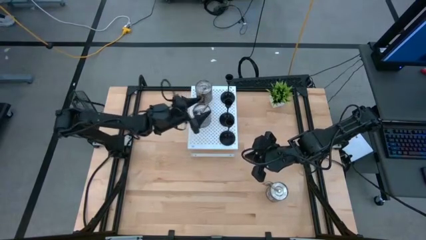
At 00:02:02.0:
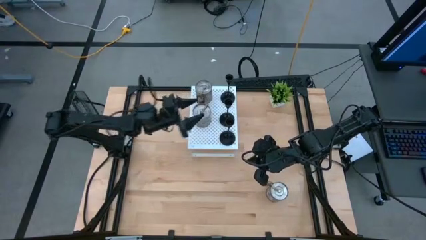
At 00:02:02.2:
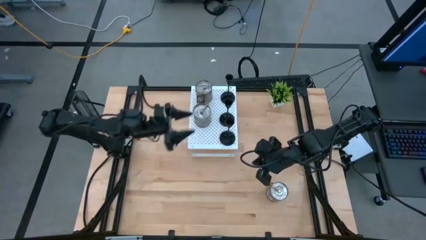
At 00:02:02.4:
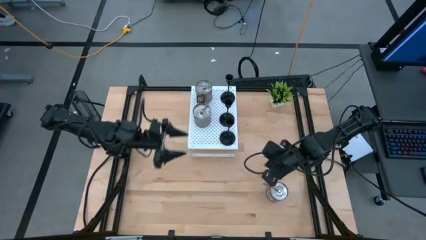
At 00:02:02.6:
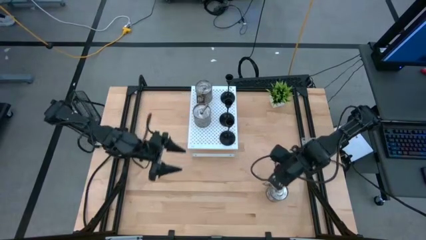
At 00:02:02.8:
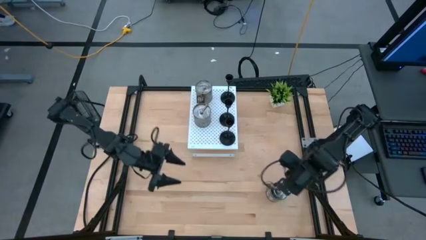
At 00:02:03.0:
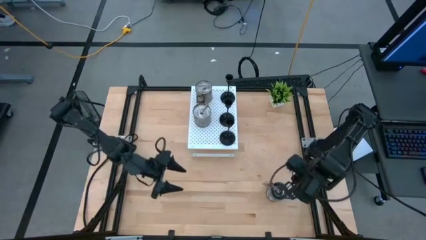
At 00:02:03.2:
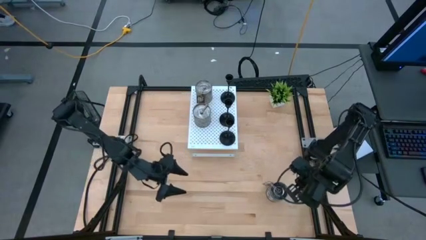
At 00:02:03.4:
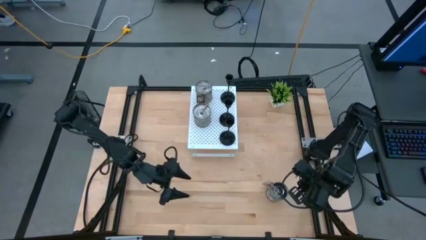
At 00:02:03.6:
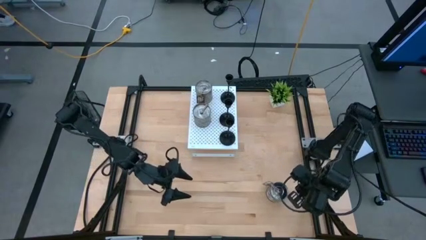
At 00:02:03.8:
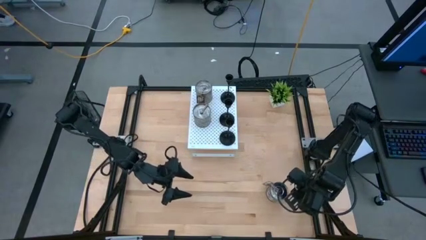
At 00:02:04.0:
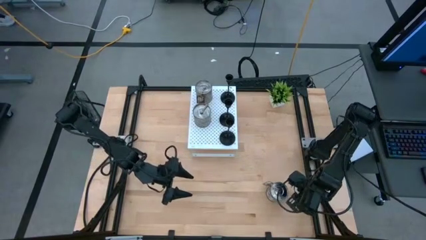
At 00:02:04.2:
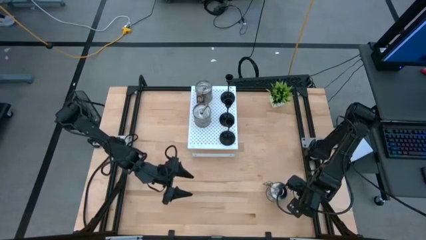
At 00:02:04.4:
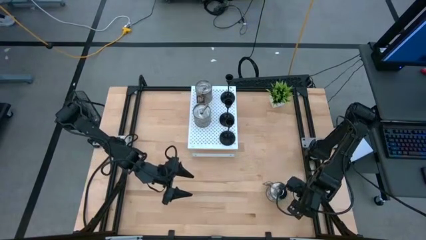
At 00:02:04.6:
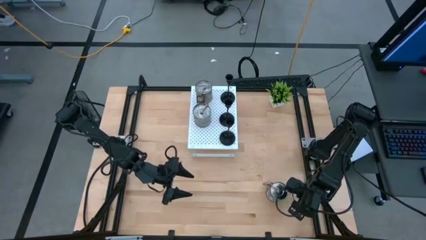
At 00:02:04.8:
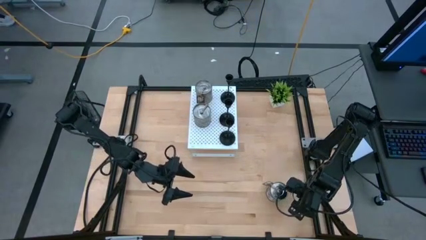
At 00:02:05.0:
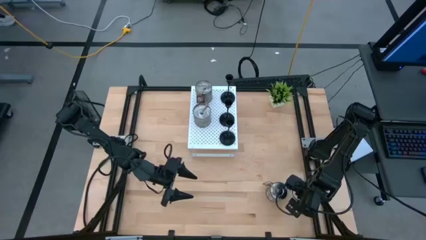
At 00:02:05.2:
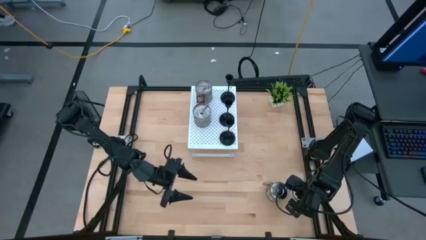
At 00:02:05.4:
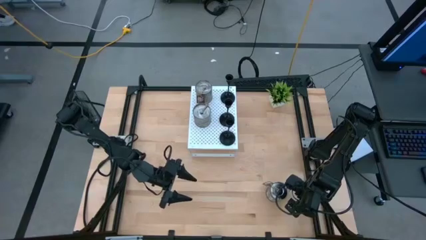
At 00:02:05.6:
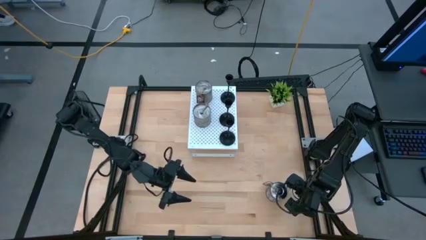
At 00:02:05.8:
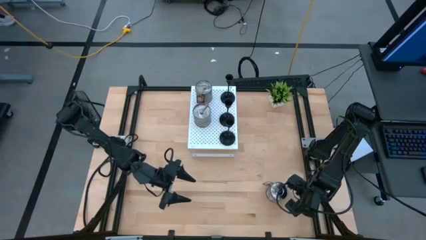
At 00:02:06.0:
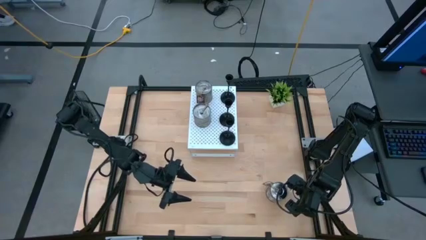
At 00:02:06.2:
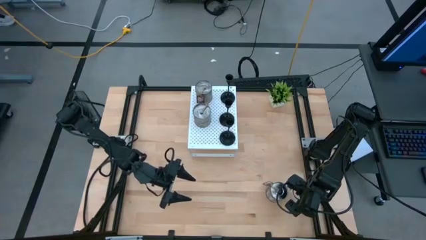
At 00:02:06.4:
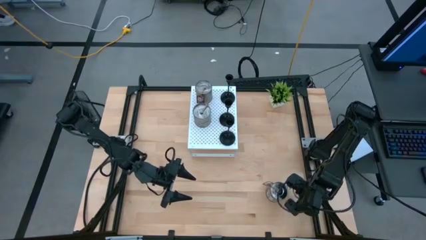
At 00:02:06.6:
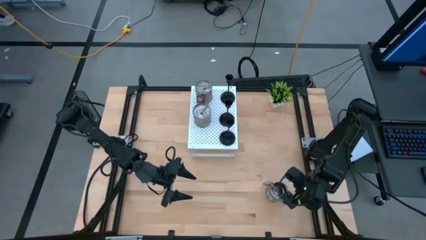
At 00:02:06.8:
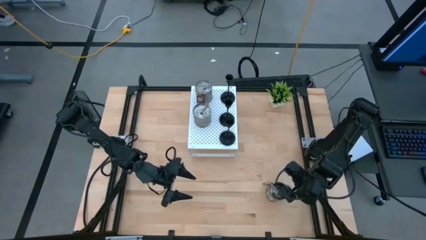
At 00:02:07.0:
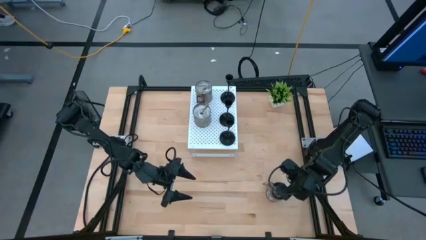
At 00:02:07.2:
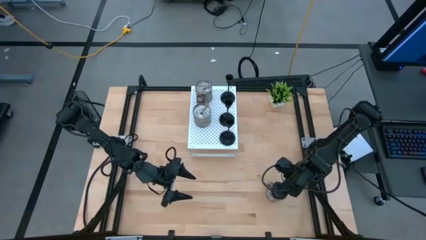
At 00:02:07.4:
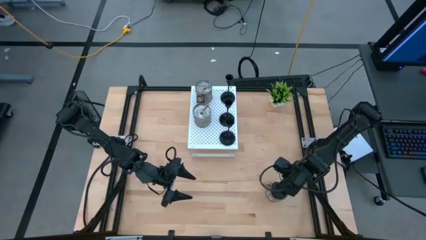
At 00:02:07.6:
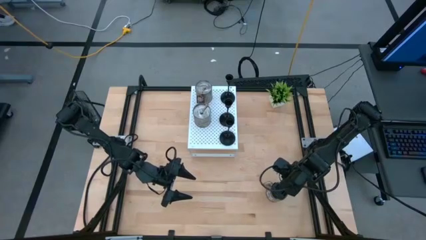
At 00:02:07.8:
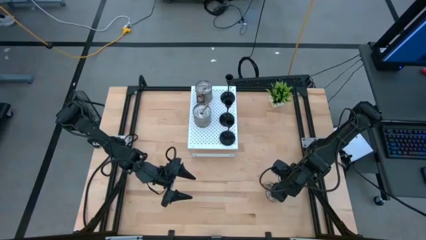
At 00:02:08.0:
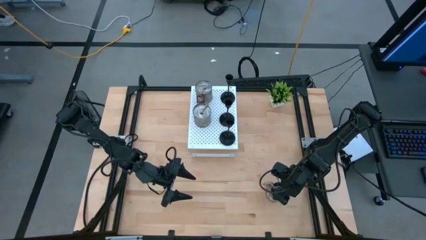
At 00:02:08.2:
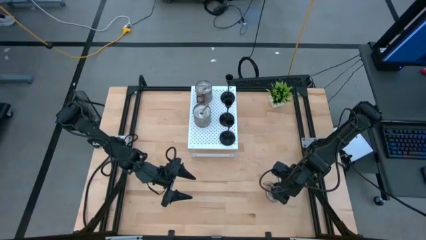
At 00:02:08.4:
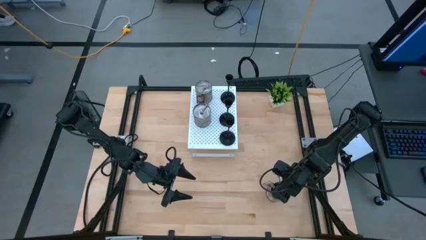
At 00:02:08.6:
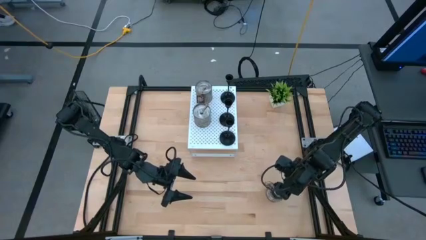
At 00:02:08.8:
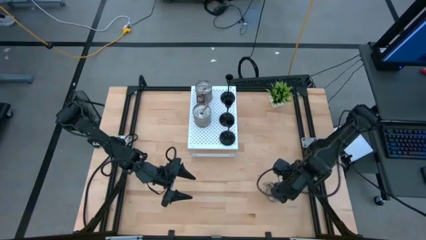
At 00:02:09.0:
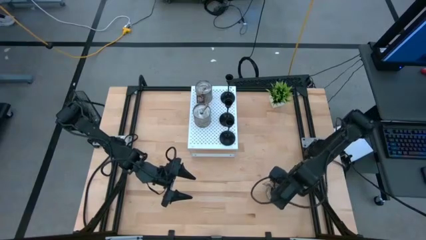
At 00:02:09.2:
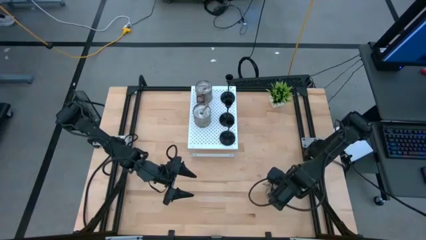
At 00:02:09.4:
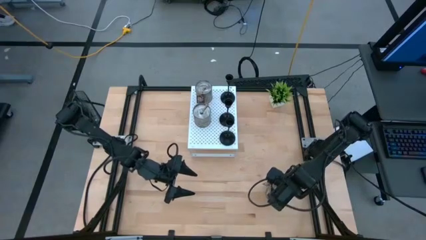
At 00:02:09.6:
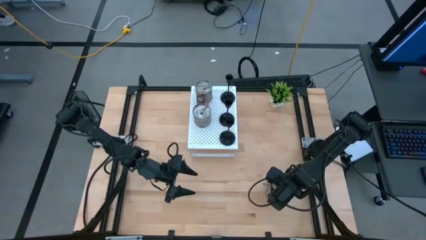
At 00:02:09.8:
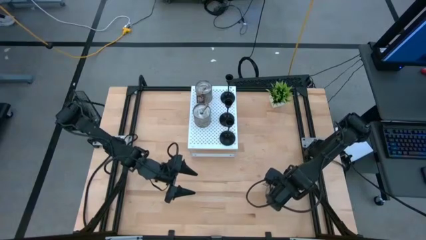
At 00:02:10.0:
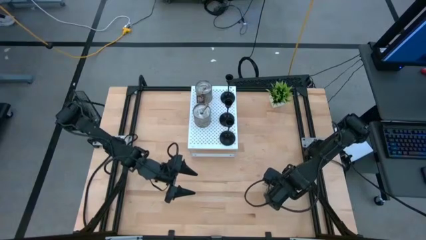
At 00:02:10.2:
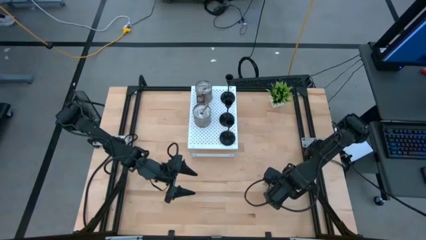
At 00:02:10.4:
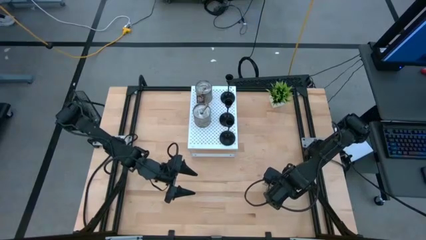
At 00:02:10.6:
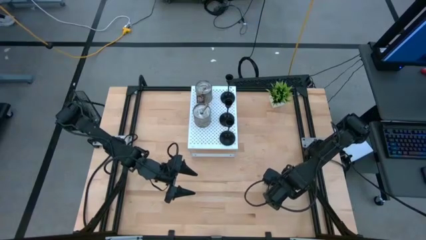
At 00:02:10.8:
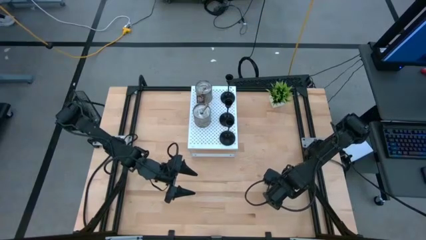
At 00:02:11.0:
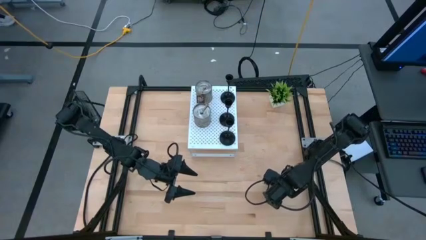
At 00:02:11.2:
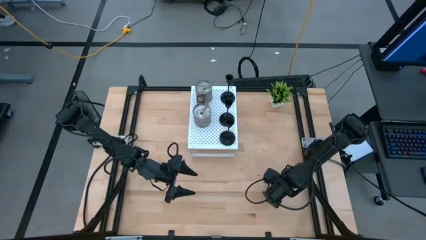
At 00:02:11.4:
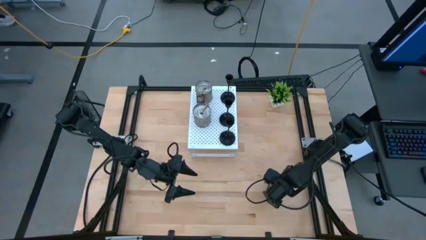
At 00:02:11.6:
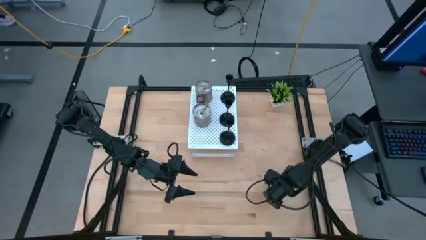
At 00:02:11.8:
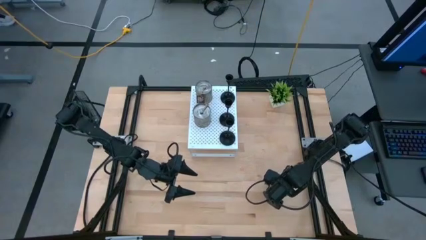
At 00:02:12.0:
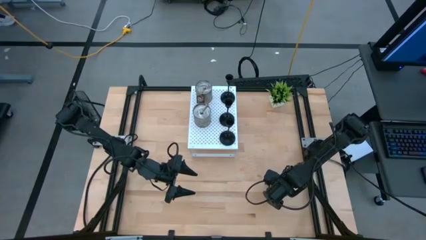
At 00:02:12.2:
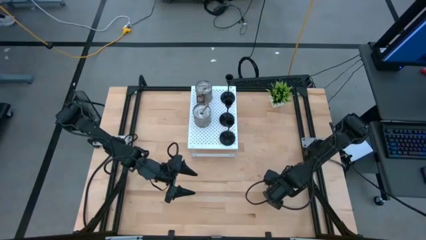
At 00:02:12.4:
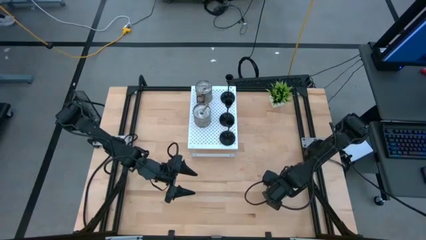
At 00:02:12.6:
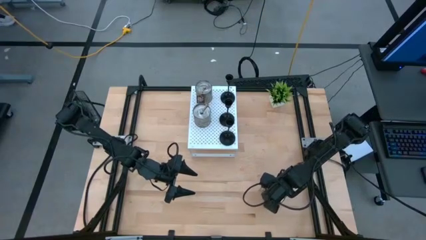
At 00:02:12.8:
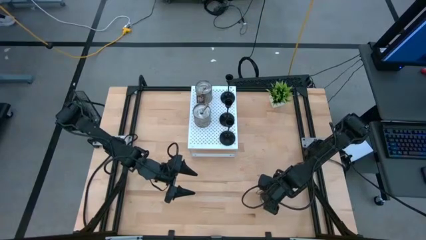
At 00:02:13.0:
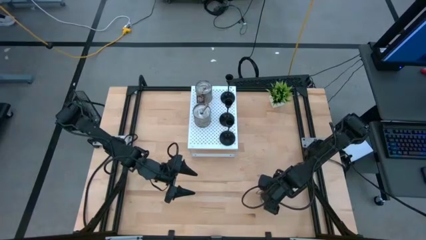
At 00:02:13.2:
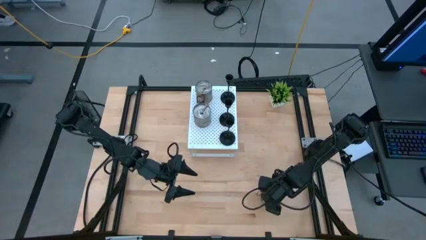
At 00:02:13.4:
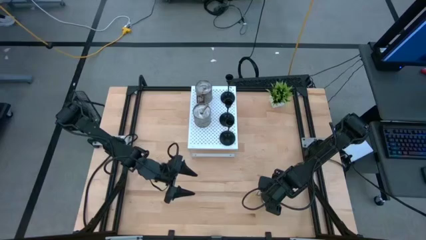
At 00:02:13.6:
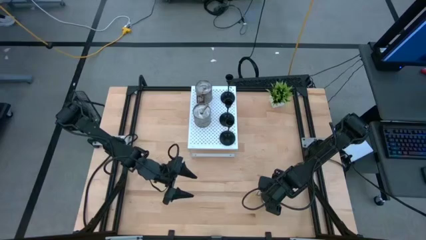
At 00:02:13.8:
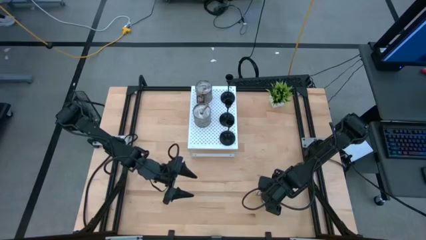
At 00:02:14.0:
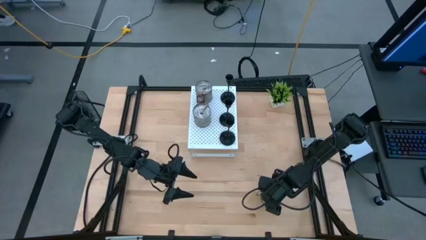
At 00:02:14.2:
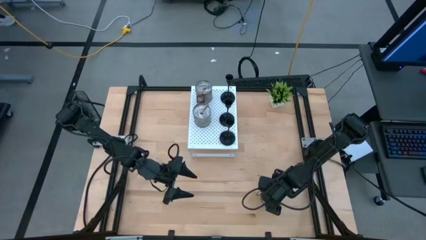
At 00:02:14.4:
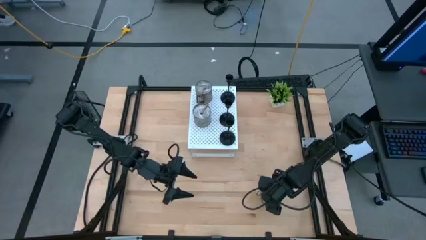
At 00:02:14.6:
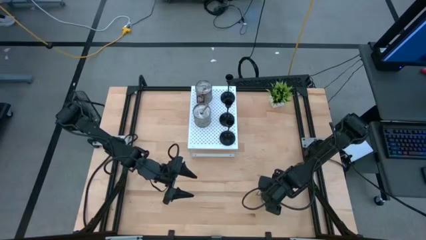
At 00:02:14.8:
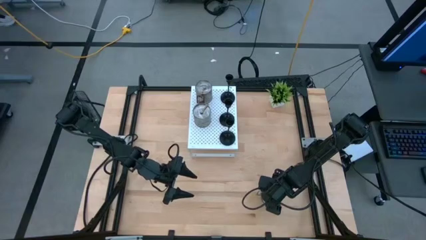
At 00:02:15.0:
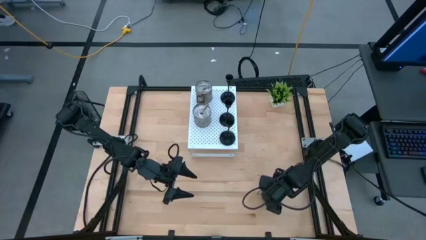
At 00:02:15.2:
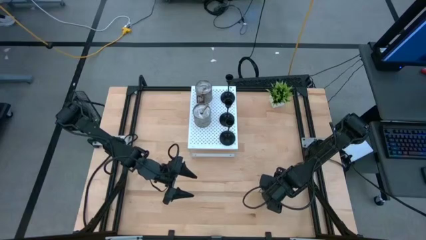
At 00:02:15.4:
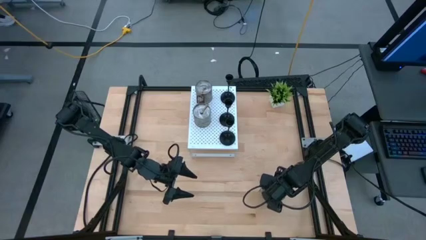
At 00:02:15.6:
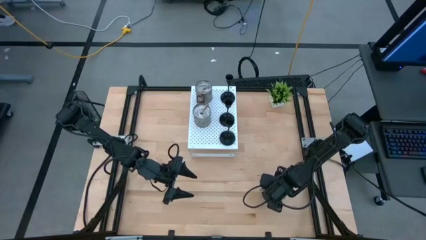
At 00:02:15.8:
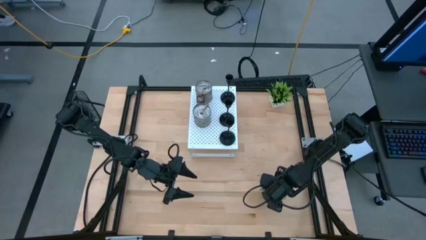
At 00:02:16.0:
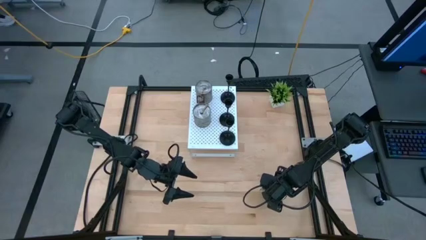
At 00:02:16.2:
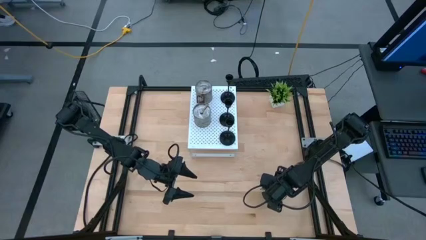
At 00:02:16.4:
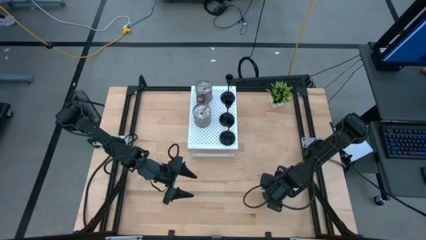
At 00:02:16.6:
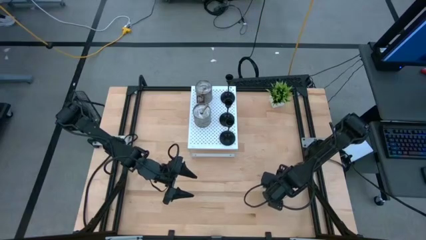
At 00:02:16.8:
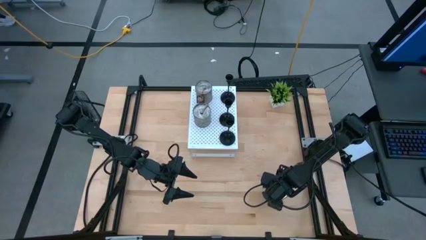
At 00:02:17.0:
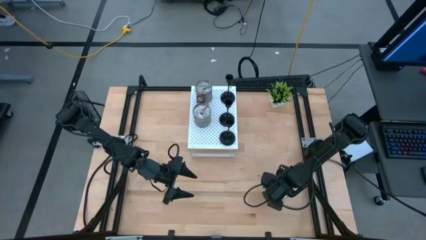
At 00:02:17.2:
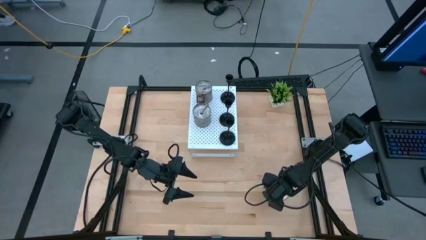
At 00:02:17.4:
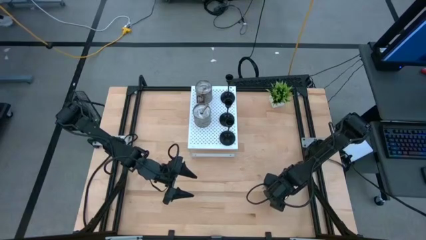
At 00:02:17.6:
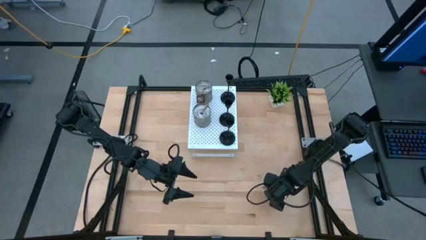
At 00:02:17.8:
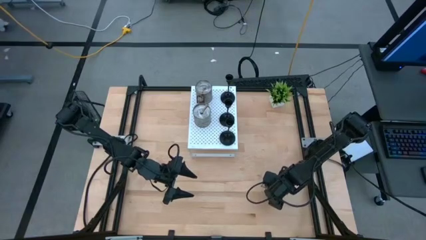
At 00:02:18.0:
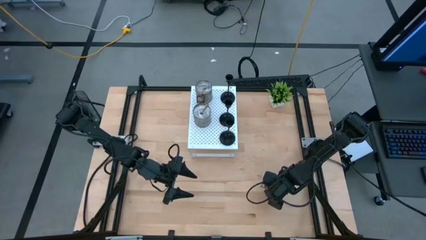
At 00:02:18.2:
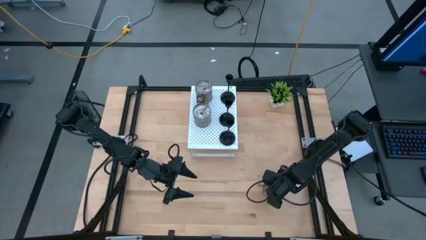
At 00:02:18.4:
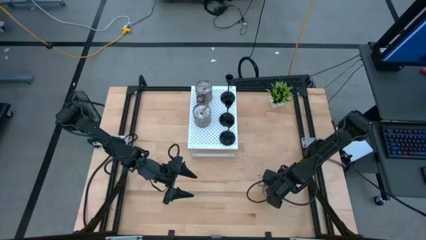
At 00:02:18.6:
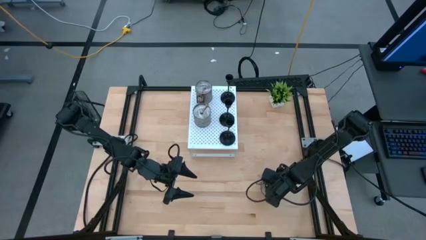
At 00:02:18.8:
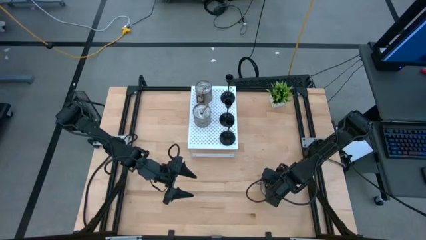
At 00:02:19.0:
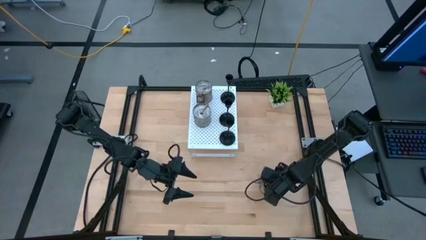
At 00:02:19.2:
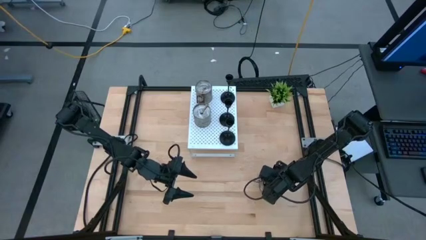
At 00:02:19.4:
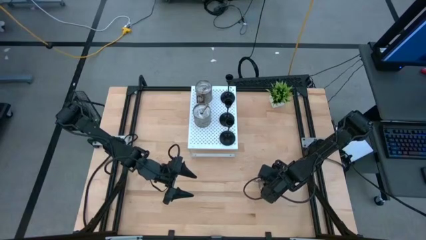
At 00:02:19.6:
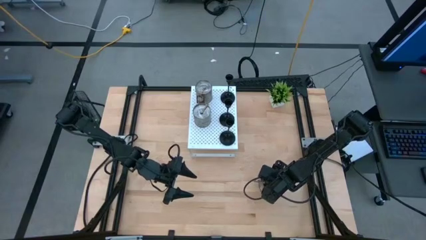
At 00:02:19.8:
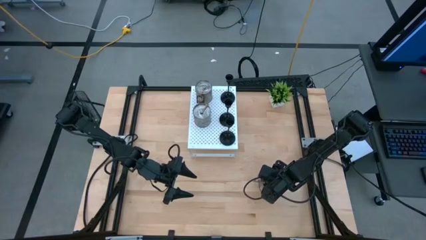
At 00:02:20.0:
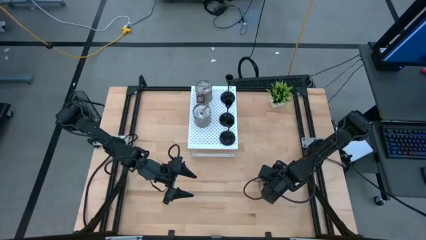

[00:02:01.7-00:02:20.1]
Task: Pick & Place candle stick holders
Put the brown scented candle on the shelf aligned with the brown scented candles
